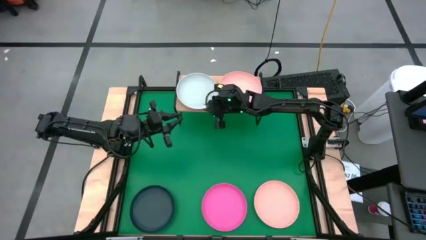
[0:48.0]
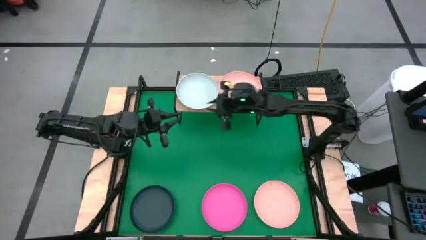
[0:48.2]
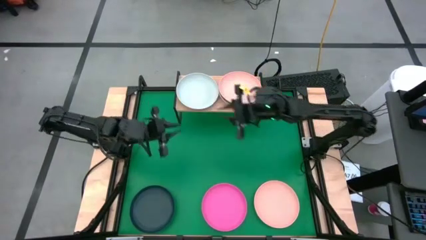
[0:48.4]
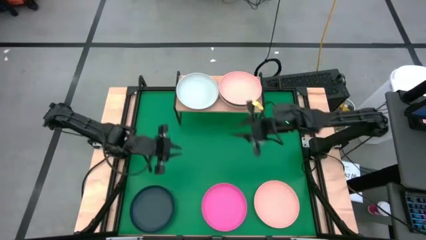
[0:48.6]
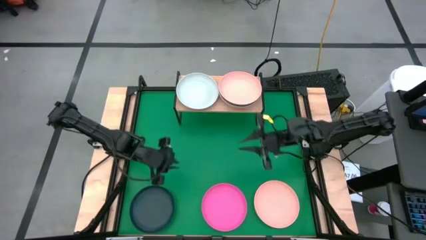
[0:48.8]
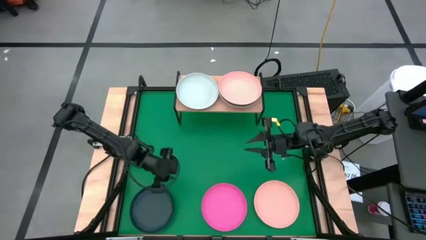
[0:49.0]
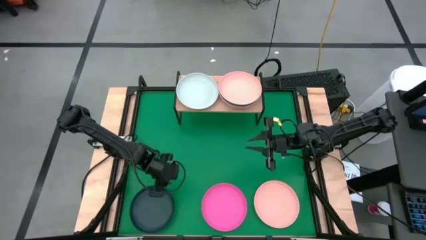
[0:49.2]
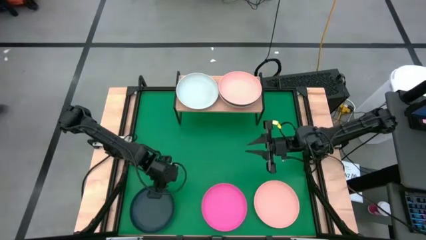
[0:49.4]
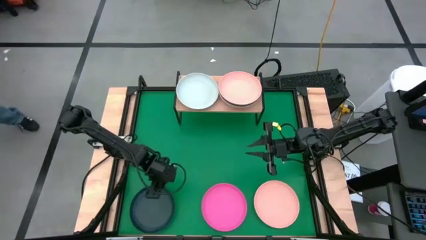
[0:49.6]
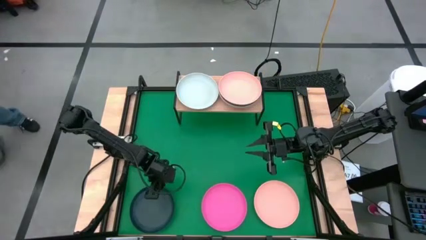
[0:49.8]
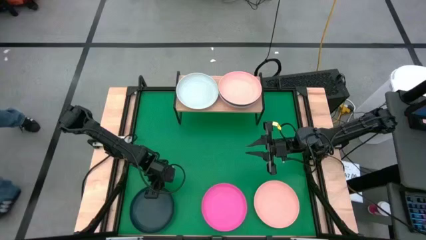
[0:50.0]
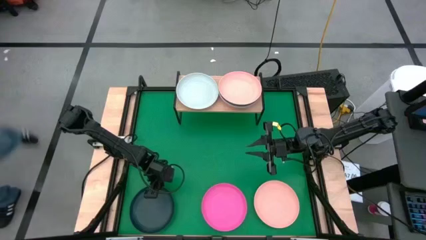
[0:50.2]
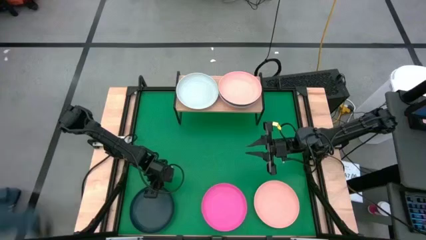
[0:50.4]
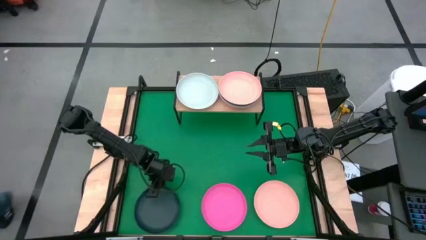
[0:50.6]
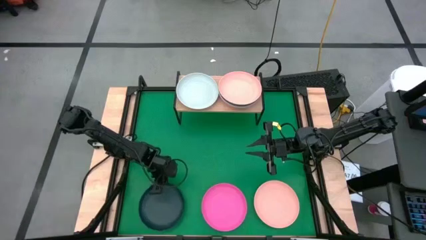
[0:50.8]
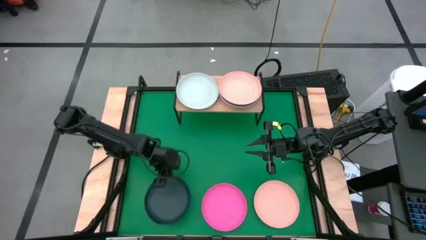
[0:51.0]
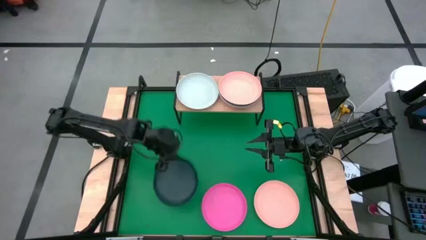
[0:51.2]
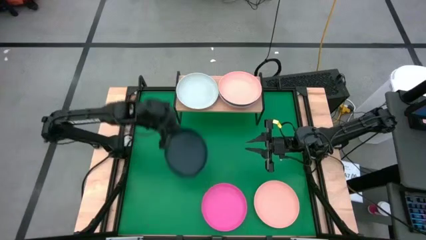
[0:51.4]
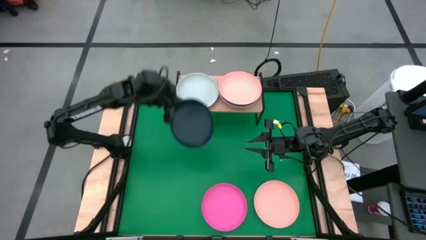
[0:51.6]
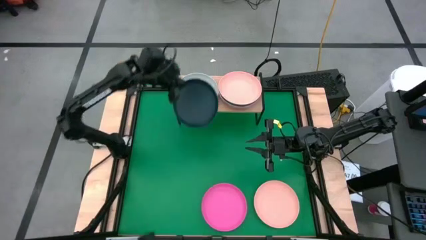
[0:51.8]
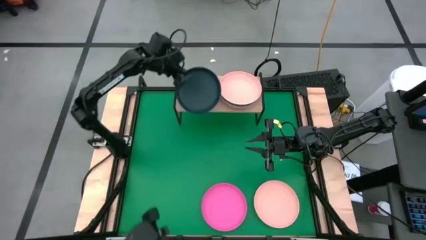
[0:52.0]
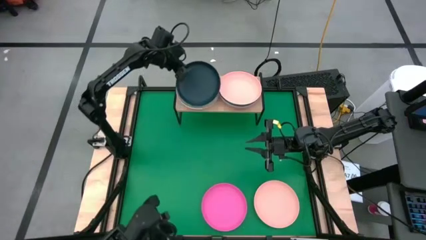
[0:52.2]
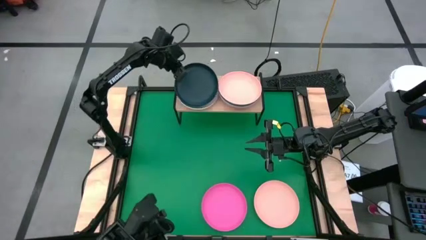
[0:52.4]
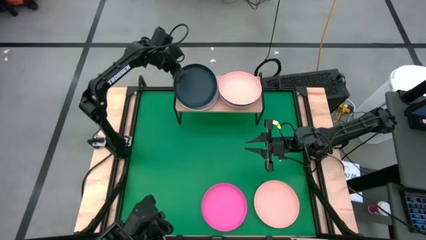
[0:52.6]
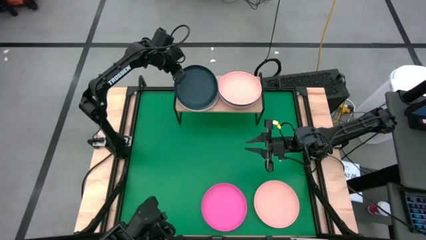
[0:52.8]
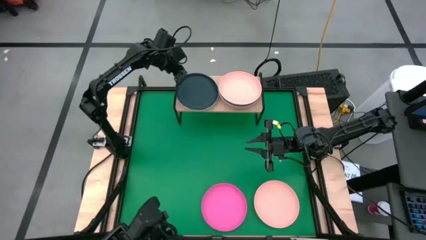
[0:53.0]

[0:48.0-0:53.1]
Task: Place and stack plates onto a shelf
Stack the black plate on top of the white plate on the shelf

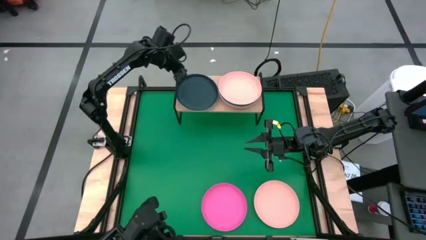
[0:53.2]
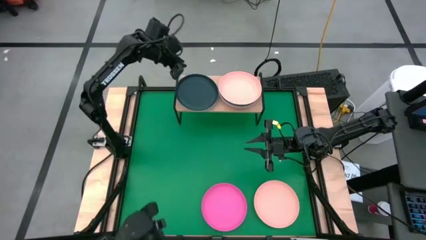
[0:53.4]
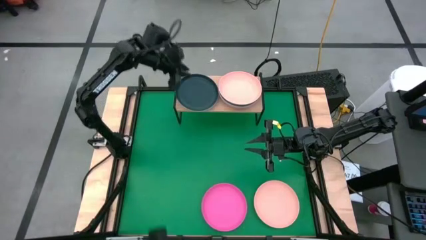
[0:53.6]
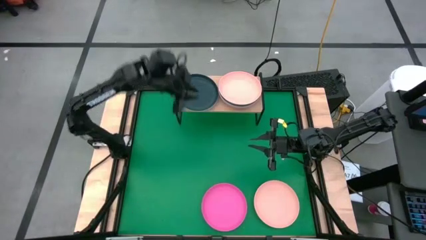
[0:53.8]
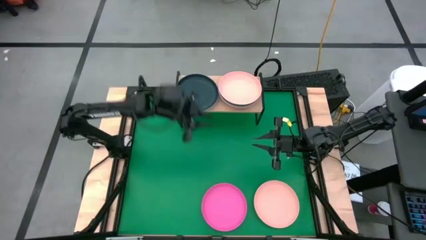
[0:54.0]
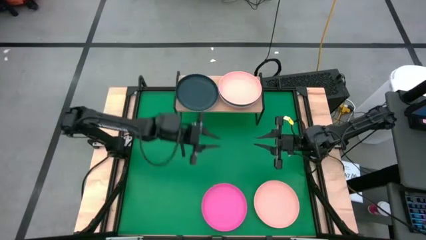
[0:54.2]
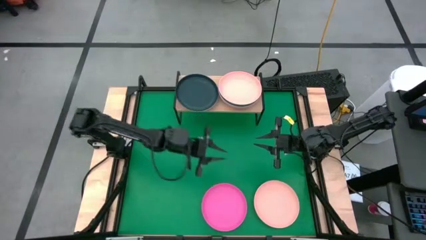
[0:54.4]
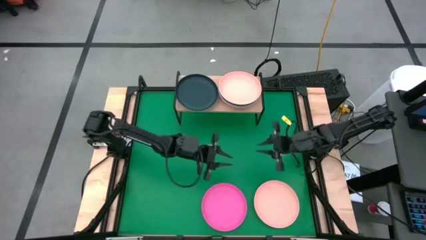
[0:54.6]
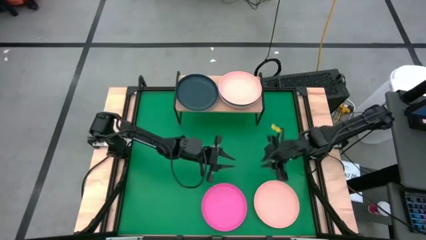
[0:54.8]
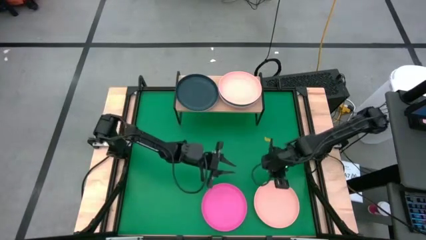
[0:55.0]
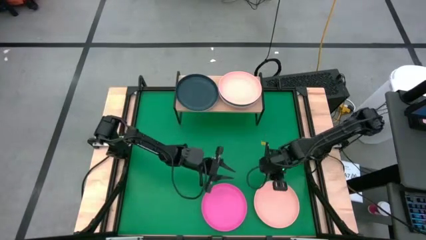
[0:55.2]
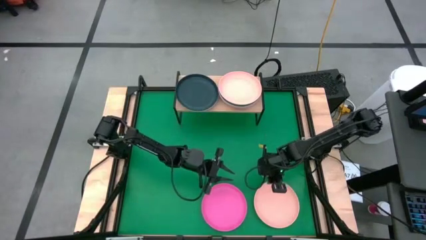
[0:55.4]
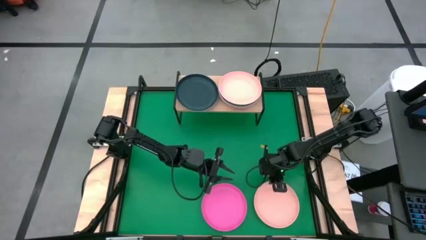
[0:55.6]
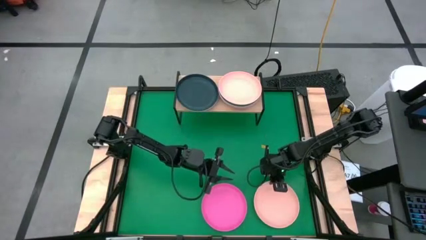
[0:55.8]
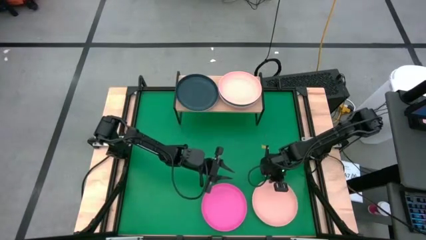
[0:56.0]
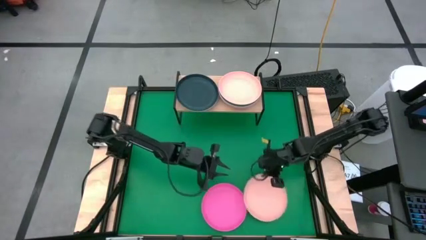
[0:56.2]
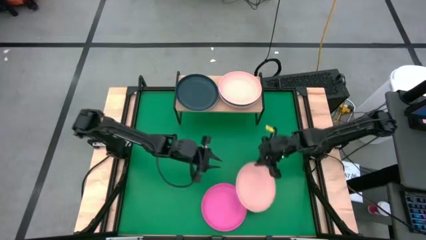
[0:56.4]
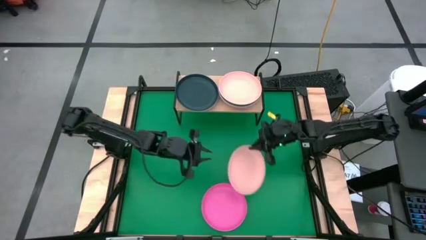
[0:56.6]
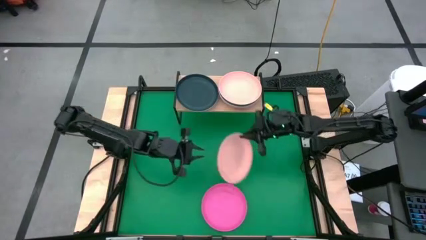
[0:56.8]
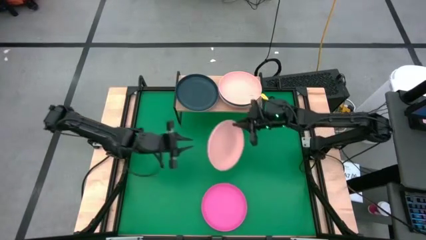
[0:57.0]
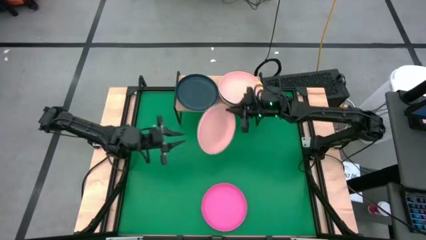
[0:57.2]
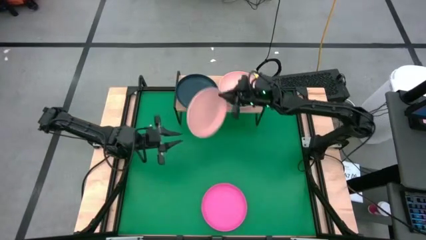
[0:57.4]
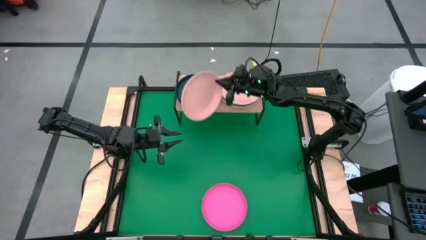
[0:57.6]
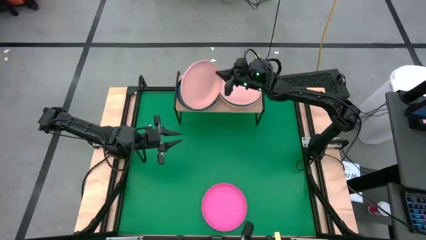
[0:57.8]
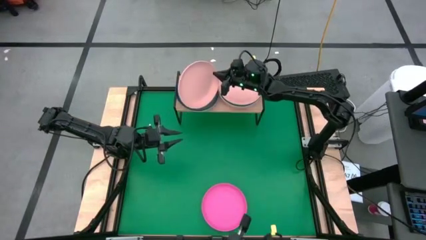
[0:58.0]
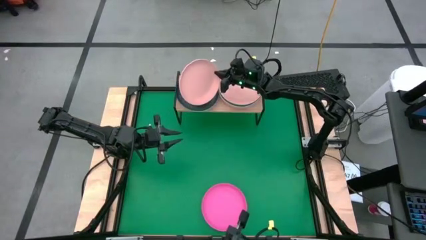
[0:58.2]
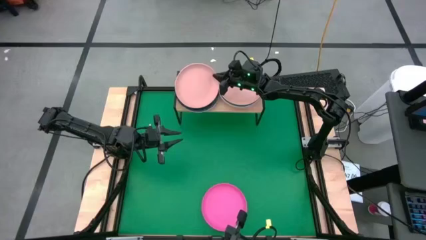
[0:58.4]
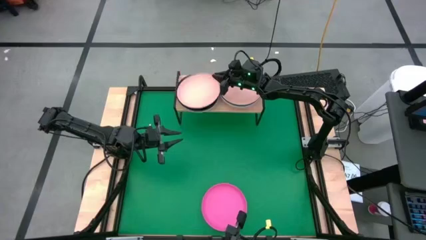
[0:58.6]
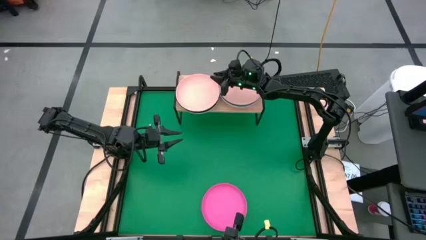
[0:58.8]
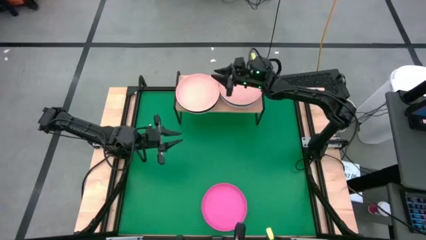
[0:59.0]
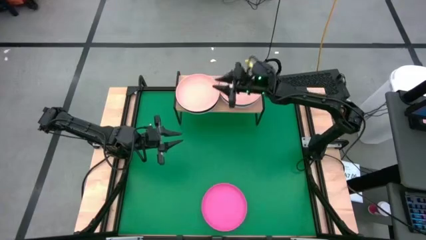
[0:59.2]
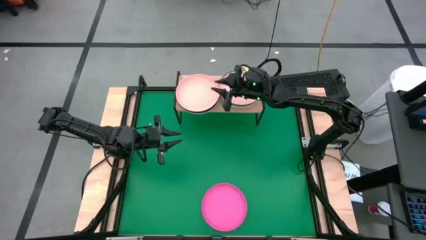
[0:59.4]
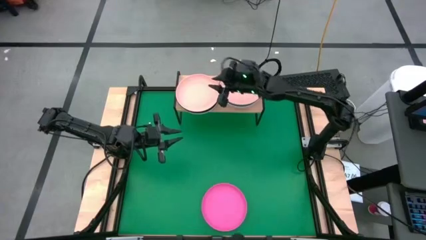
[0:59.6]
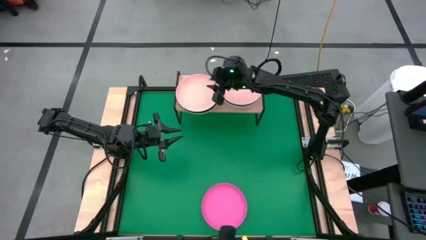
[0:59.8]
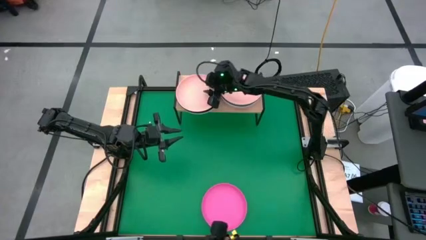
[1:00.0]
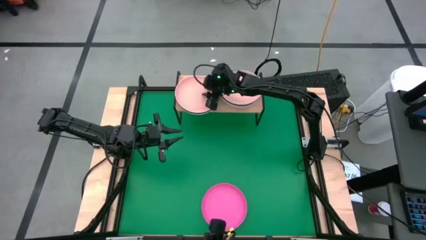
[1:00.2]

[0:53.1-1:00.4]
Stack the light orange plate on top of the black plate on the shelf
